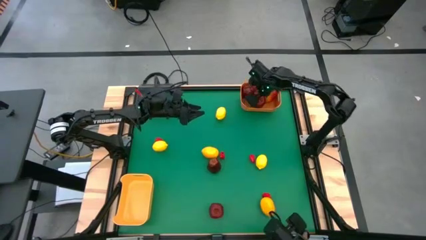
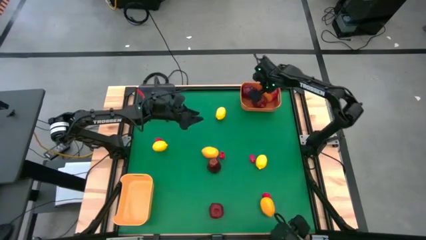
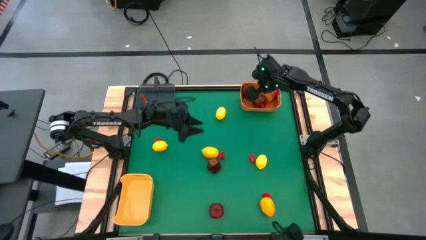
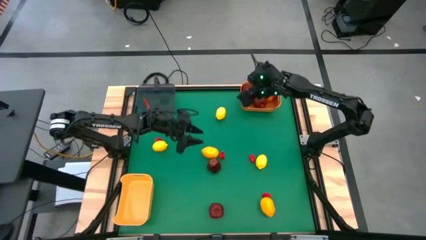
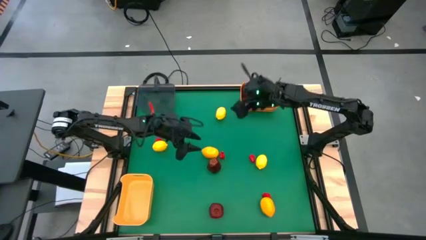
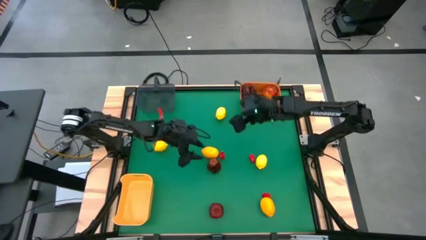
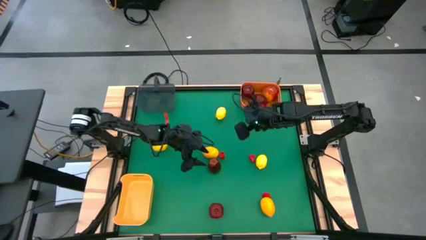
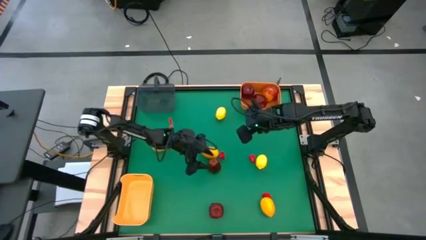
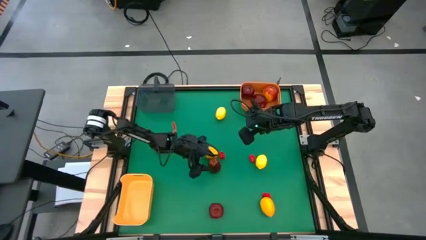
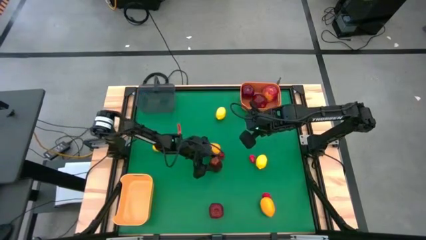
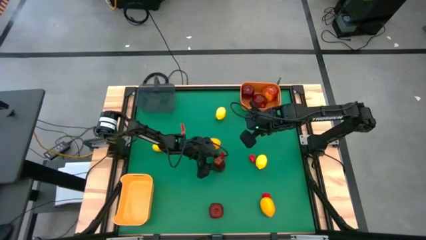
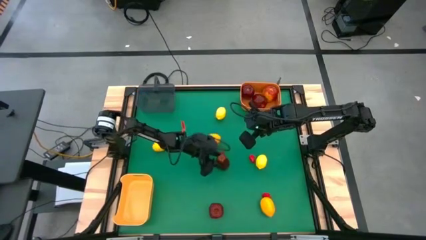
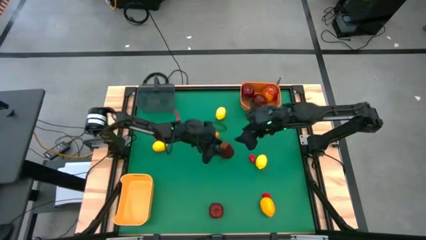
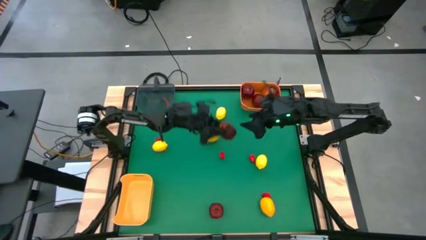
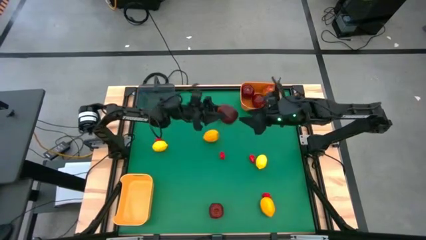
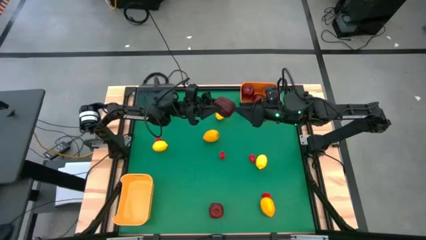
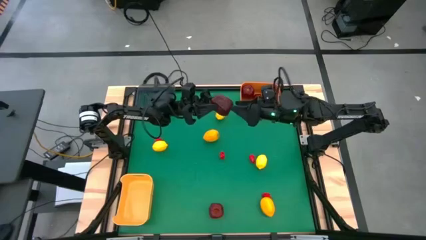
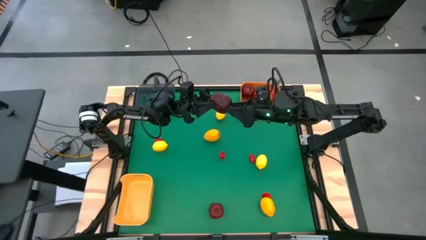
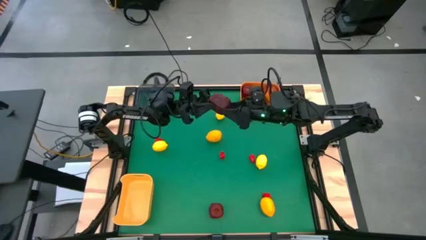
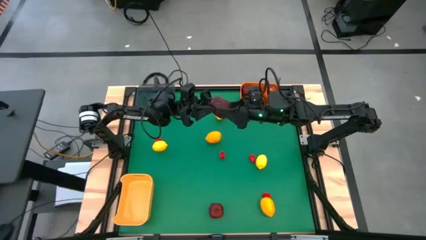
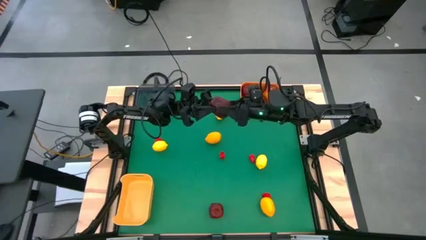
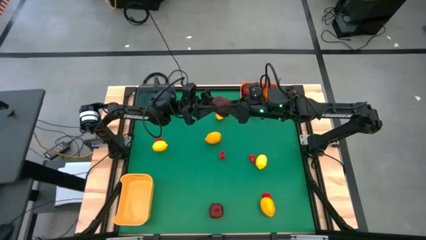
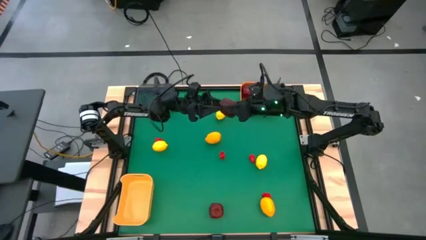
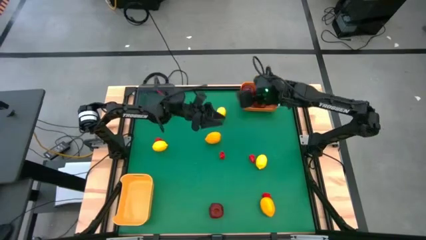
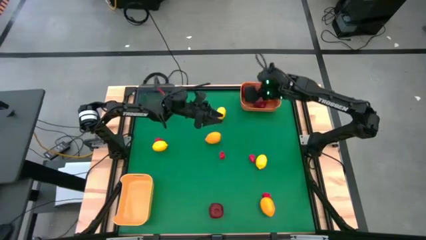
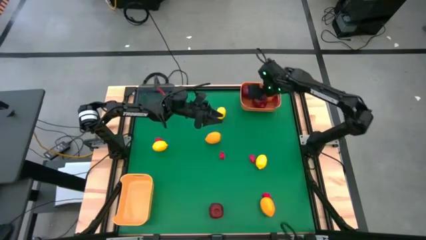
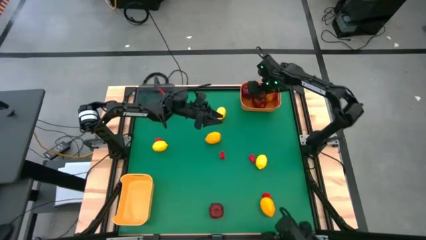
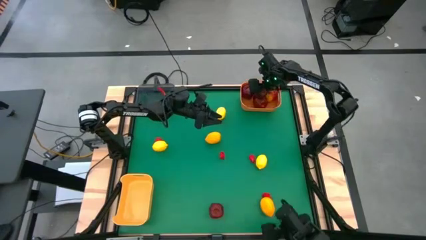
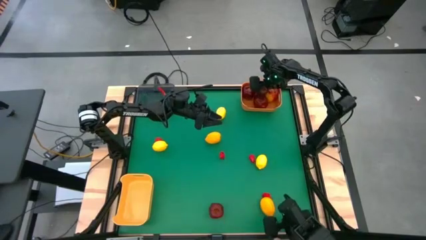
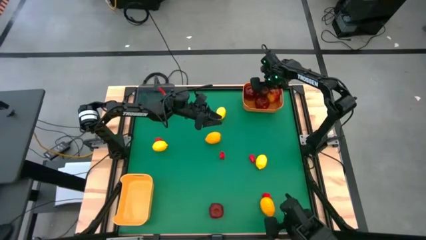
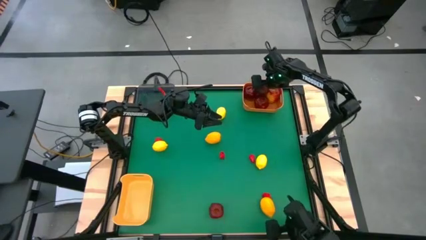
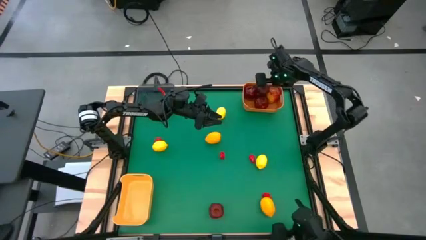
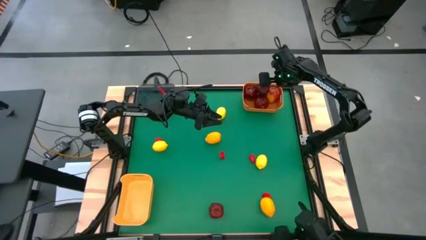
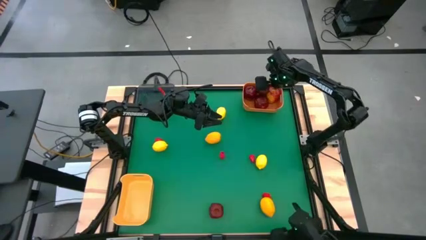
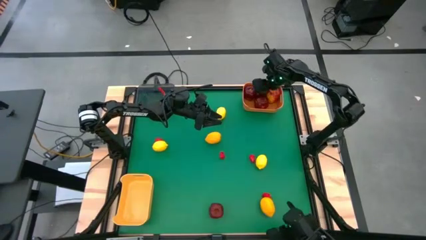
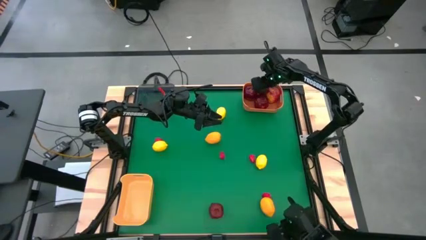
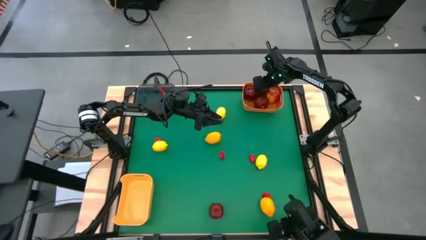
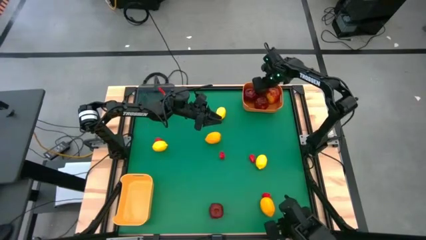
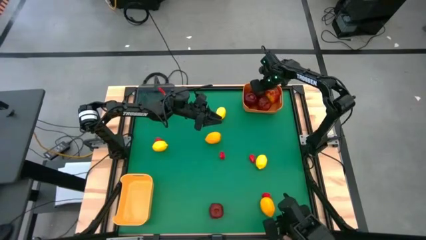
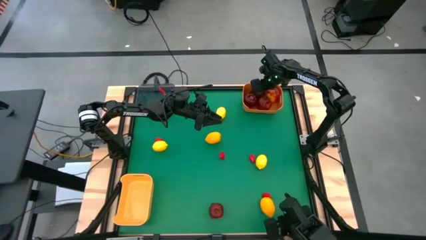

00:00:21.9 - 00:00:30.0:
Task: Sort produce into baskets
Put the apple into the orange bin

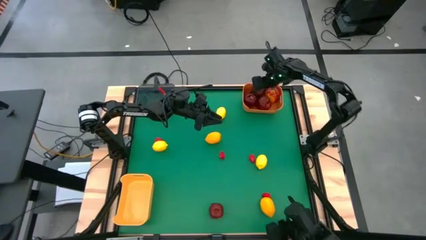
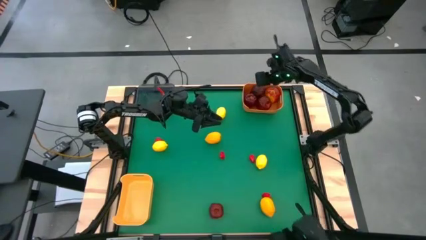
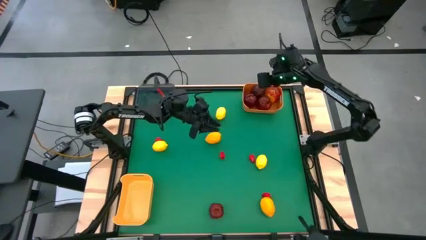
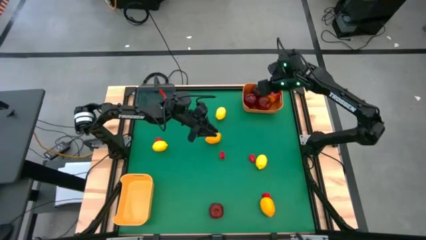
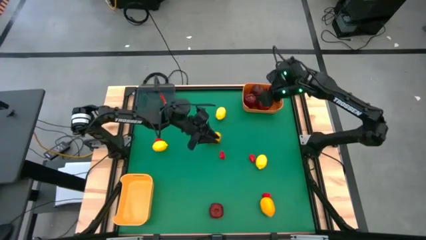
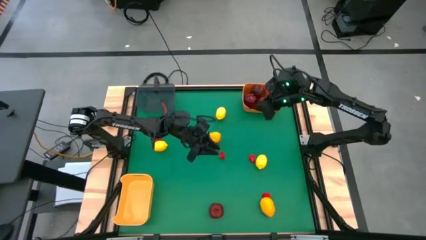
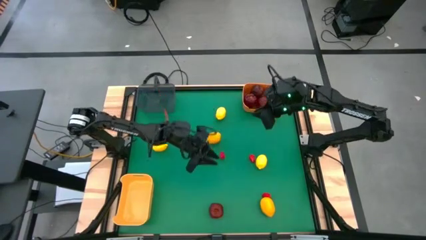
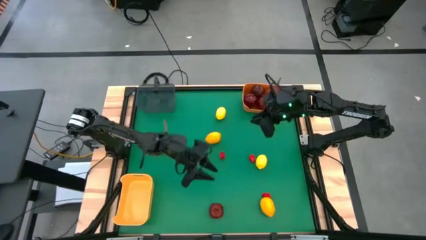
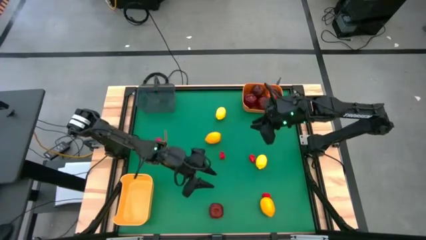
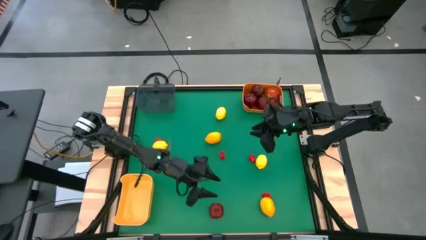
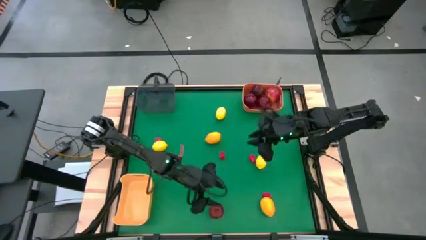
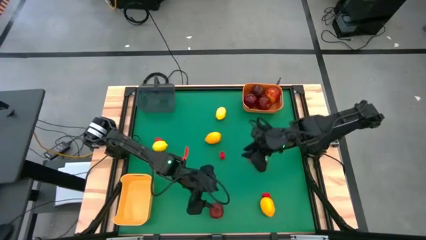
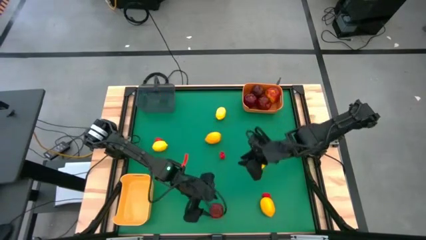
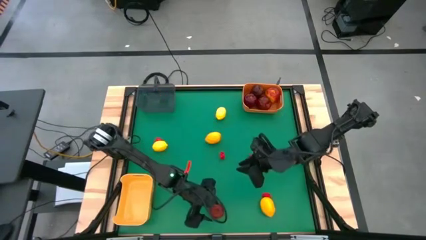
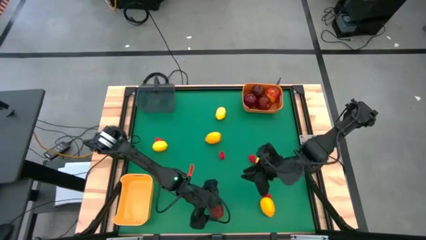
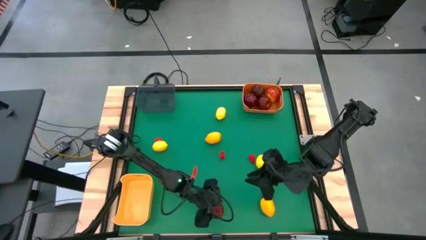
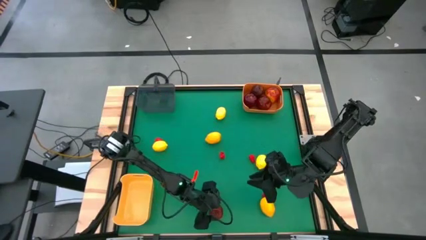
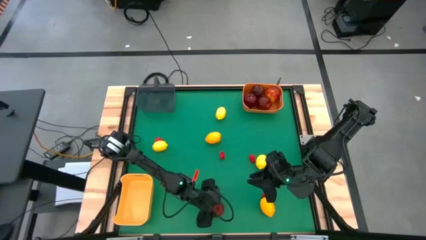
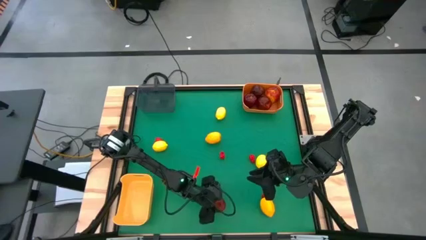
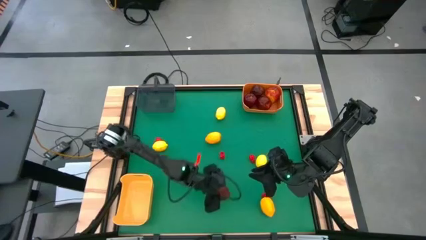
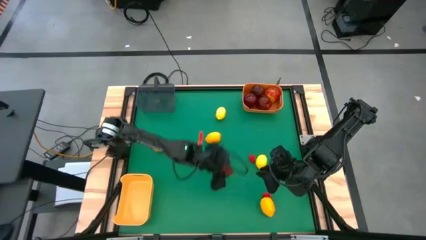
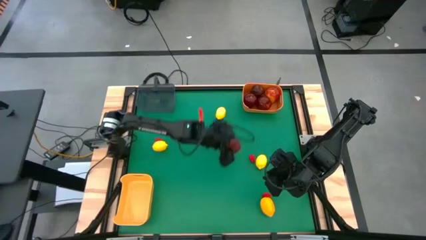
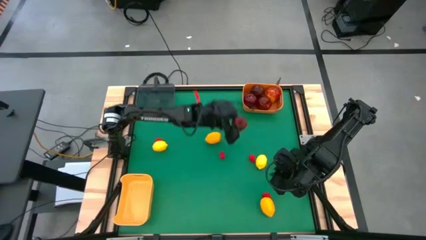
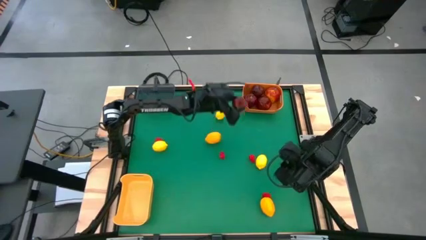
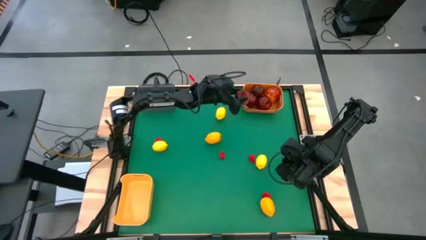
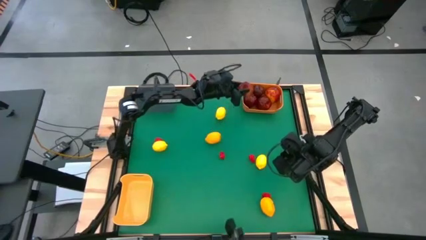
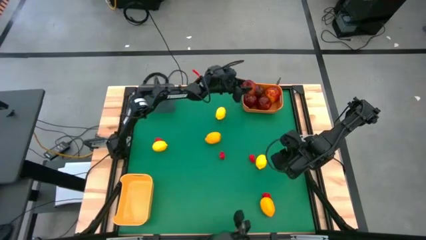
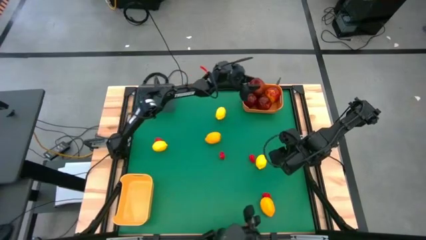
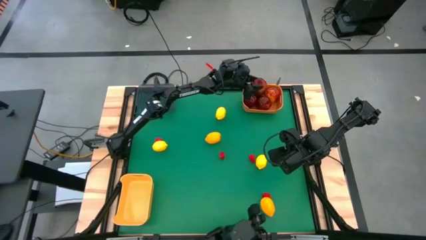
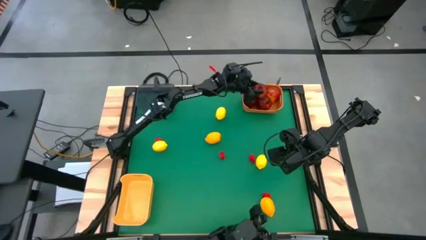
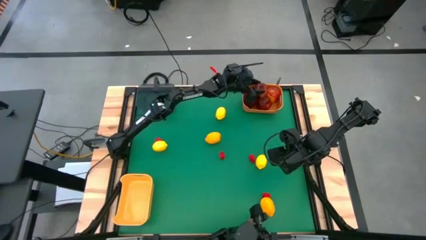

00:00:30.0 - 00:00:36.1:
Put the apple into the orange bin

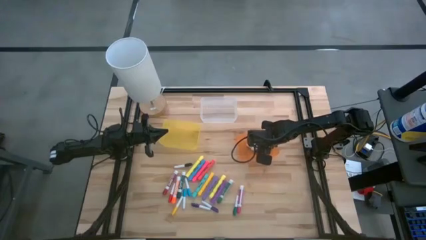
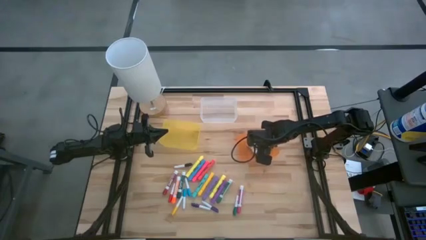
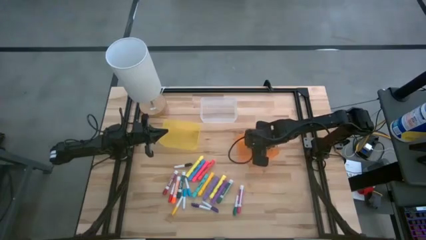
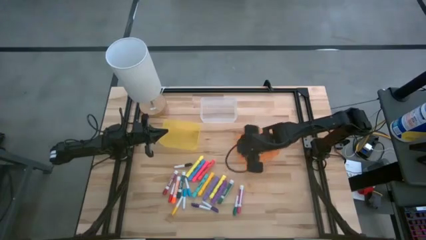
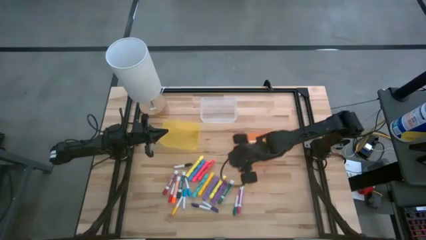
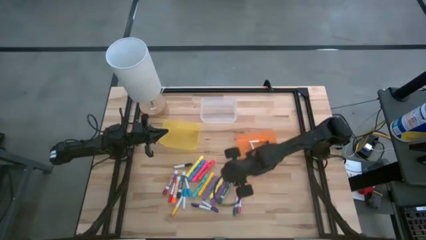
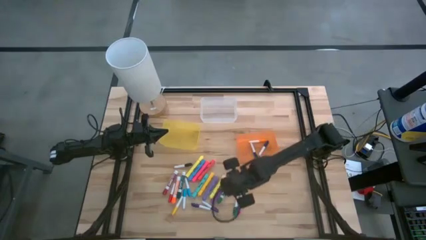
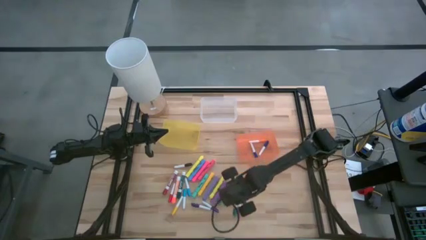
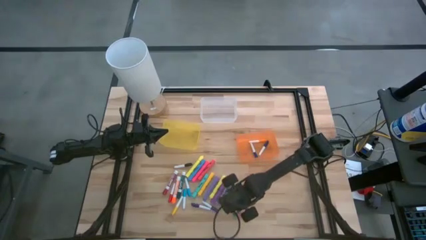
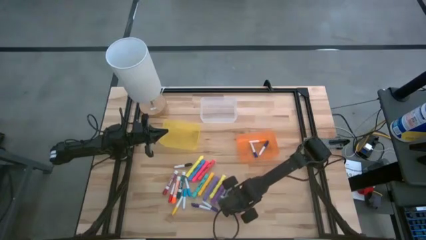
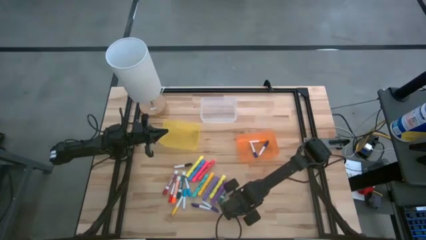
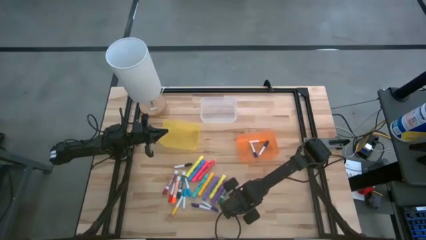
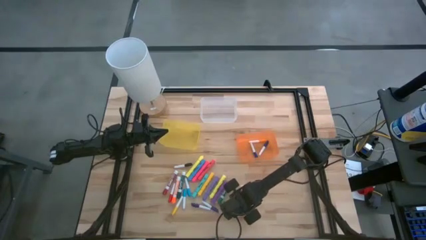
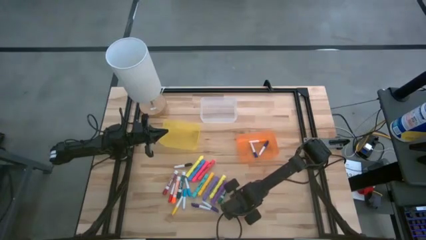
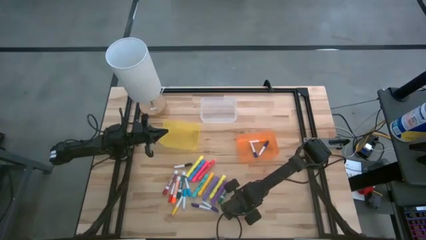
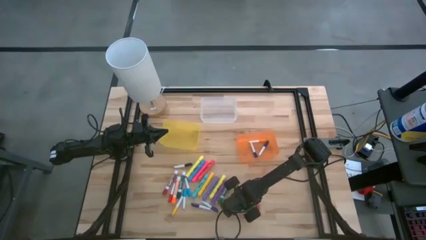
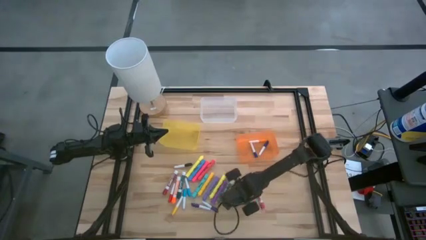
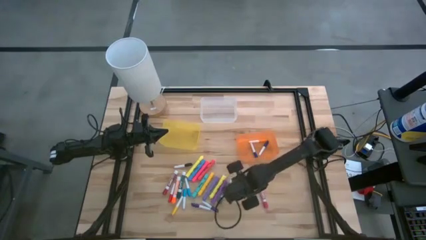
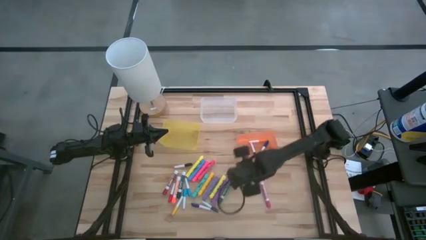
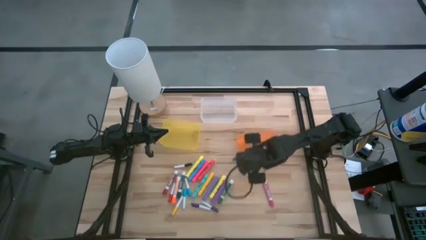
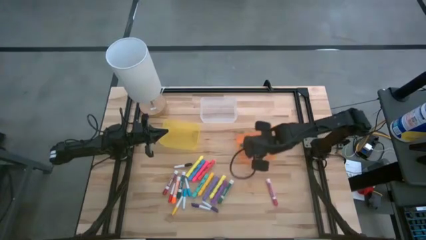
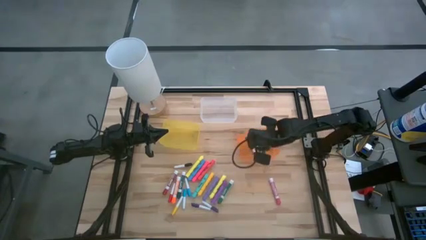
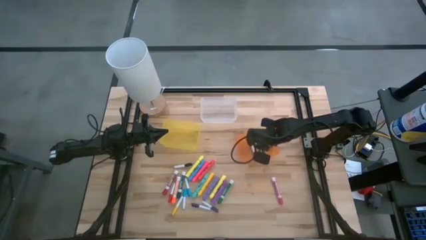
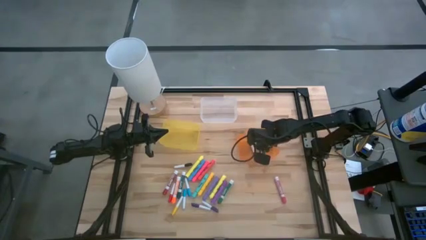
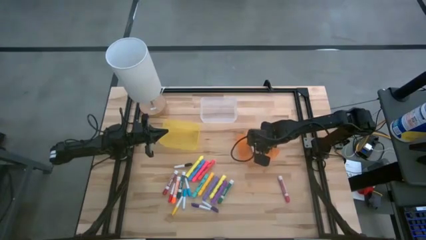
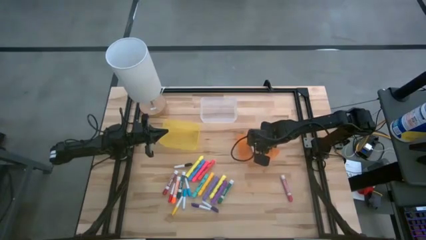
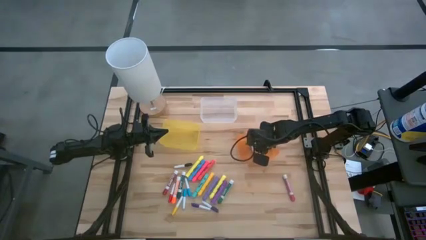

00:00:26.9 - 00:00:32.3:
Task: Pick & Place Markers
Put the small green highlighter pen into the orange bin
